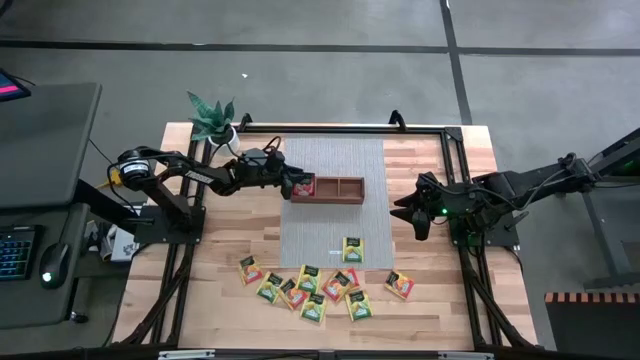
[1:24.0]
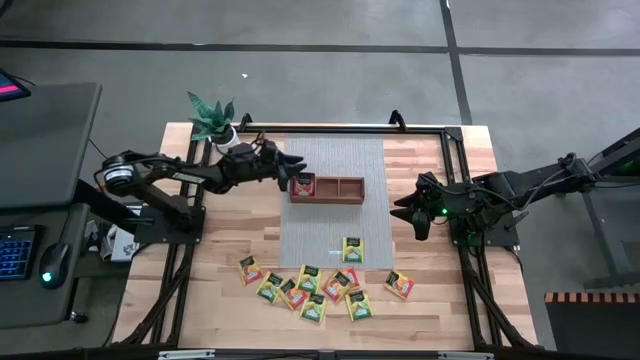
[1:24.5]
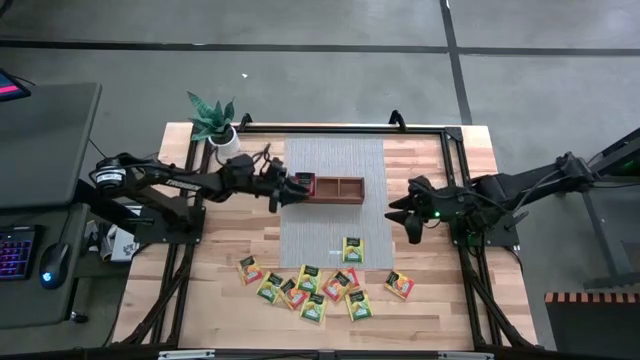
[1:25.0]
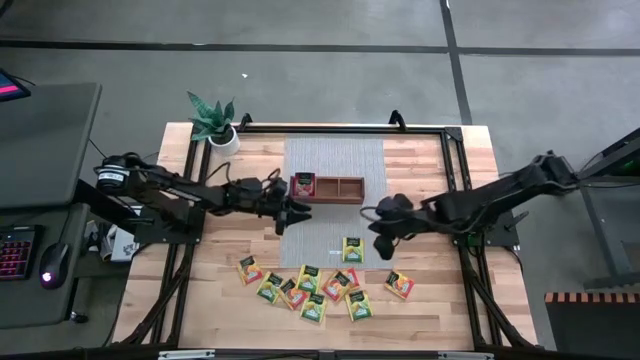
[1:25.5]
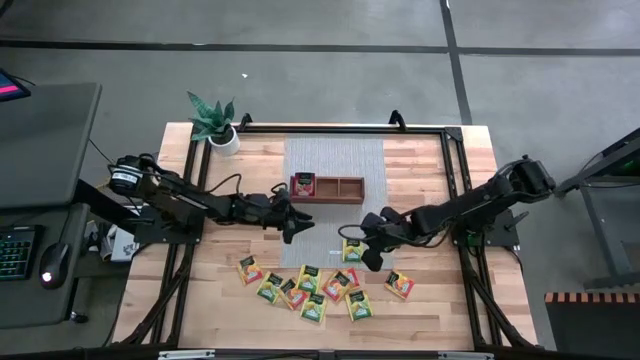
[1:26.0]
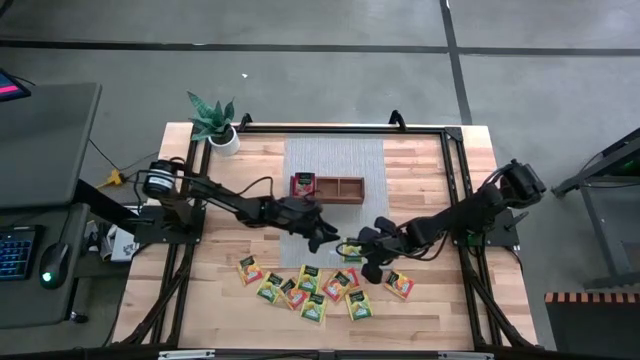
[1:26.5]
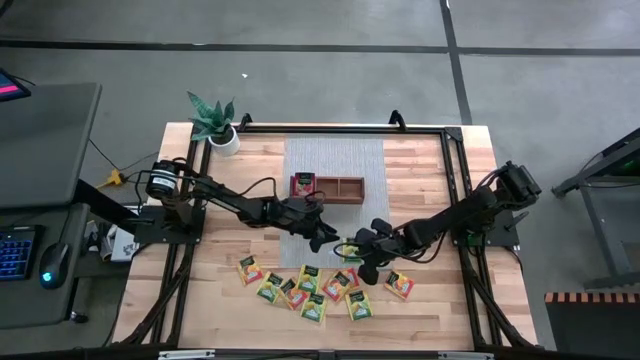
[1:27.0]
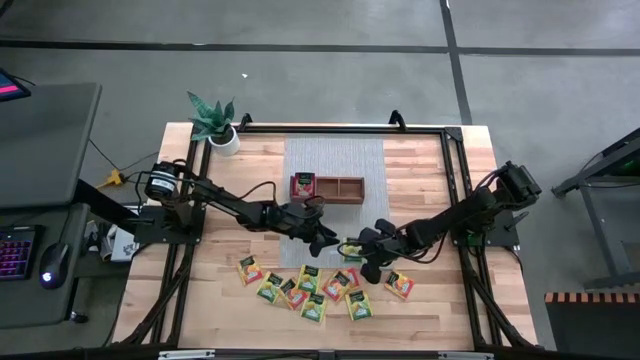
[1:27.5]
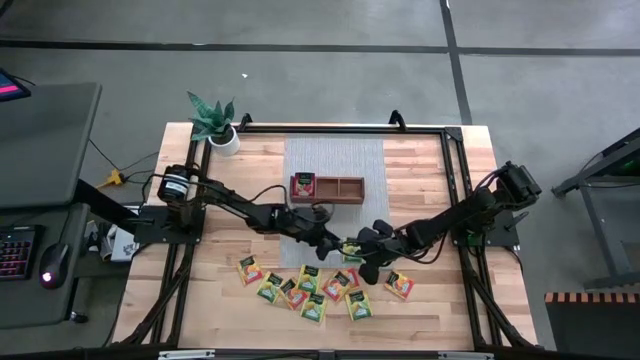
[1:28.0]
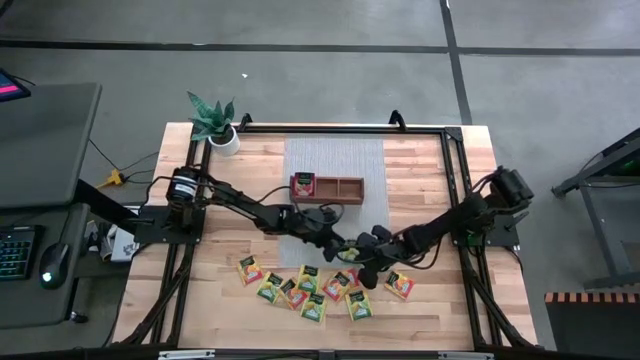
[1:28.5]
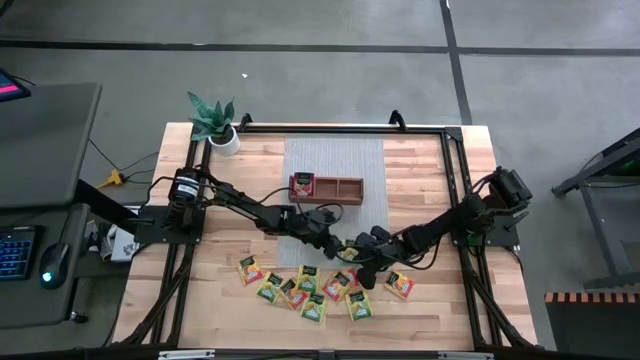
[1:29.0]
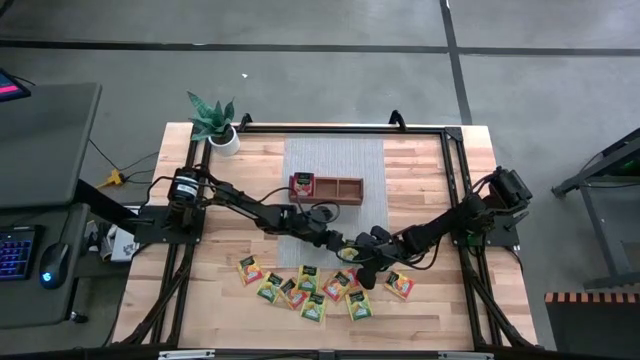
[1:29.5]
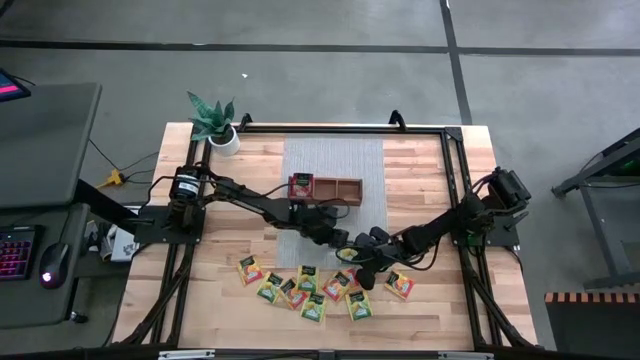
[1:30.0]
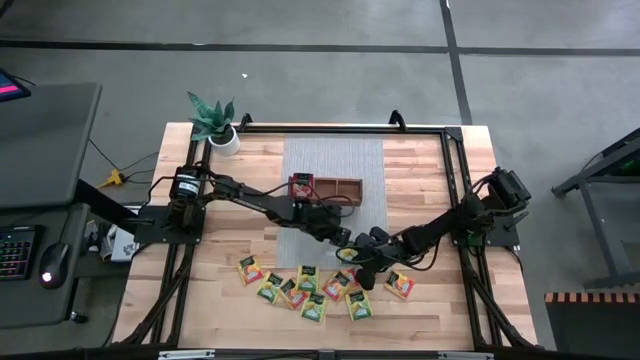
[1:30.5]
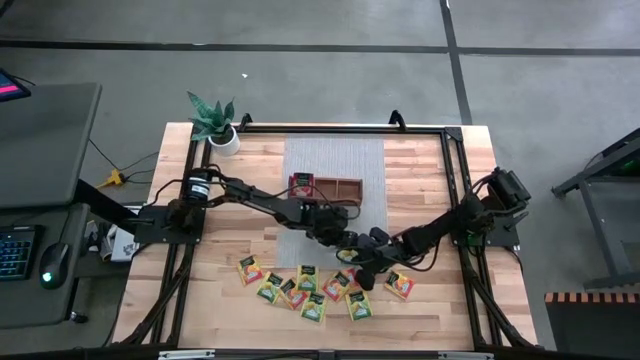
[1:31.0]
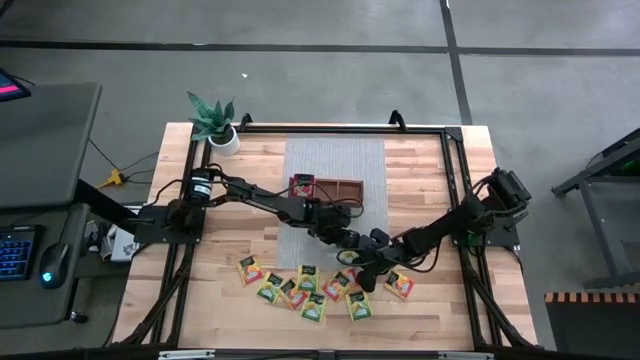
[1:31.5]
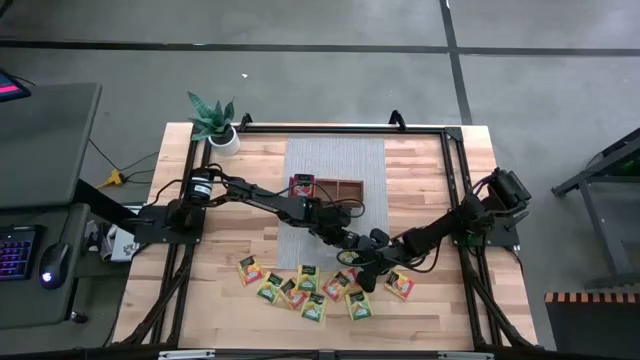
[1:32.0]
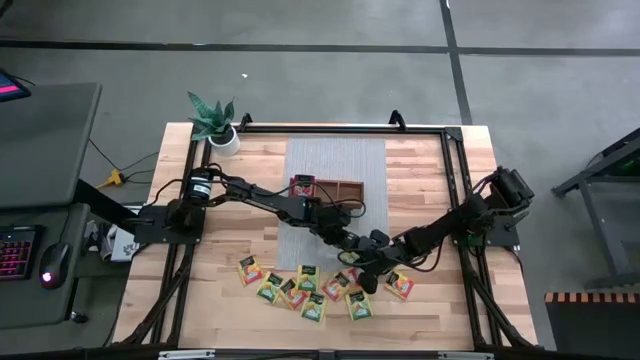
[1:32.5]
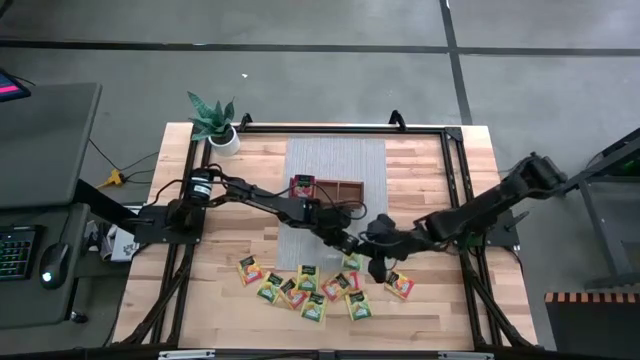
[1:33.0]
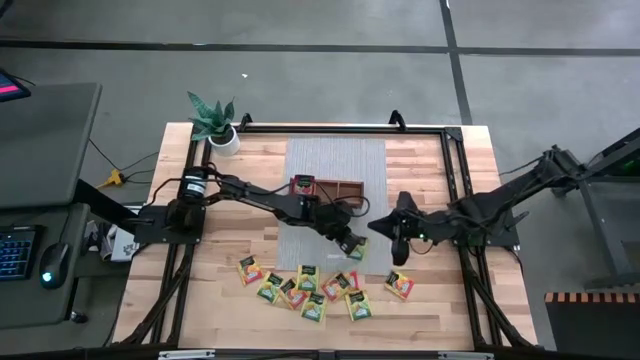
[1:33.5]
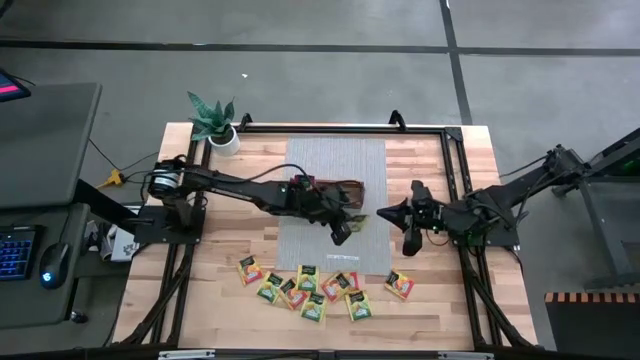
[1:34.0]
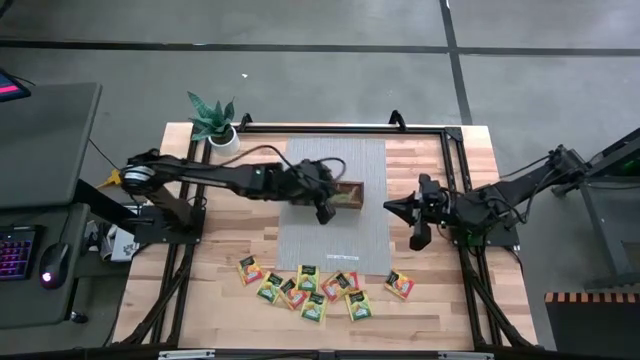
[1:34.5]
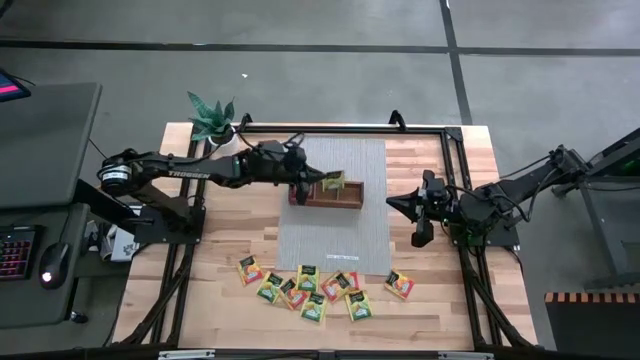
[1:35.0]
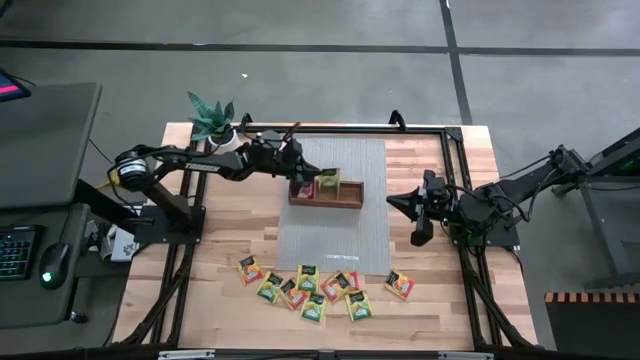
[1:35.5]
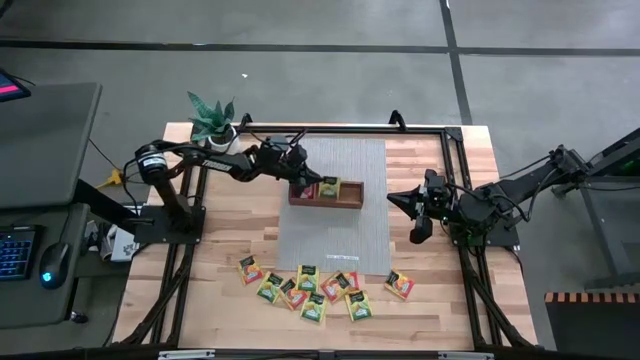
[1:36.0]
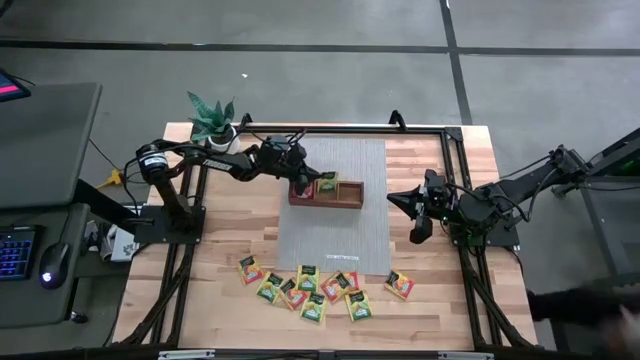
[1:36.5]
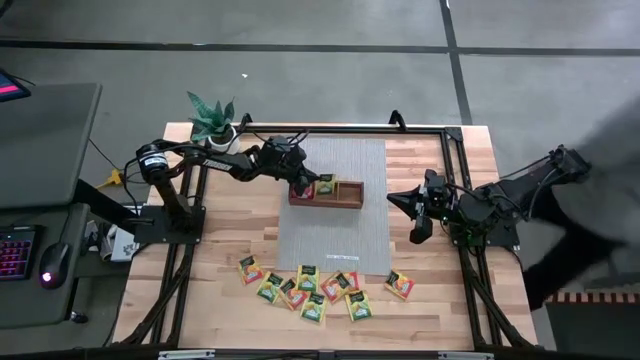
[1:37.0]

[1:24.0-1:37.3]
Task: Pick & Place Tea
Put the yellow tea bag into the middle section of the wooden organizer

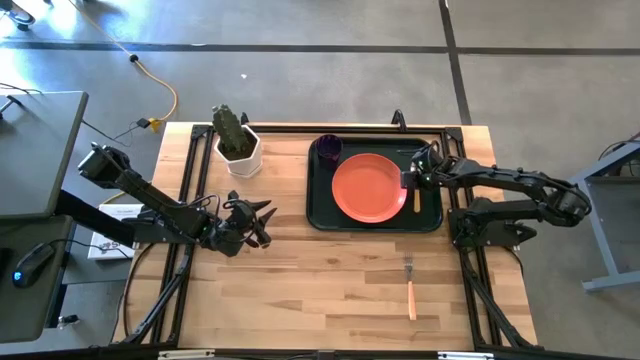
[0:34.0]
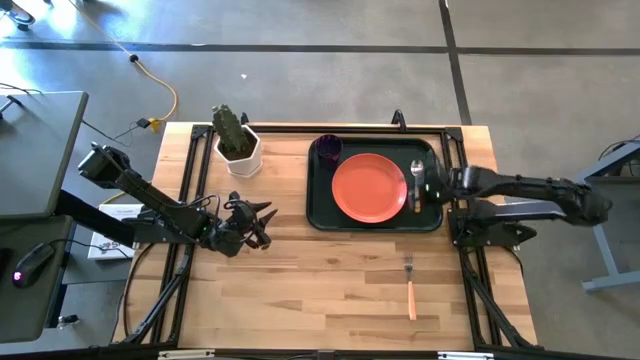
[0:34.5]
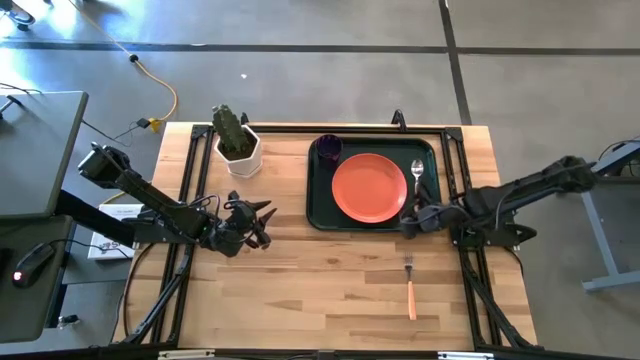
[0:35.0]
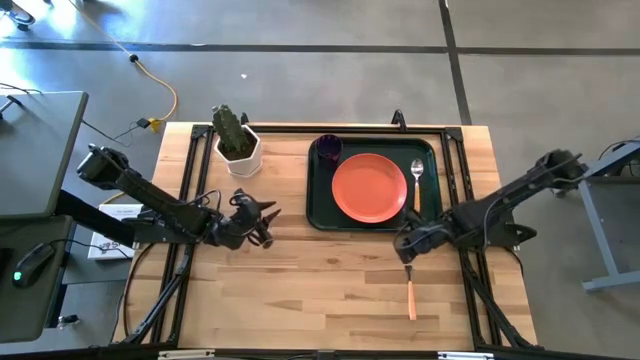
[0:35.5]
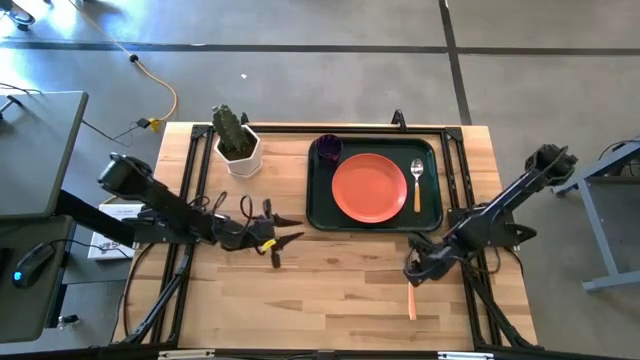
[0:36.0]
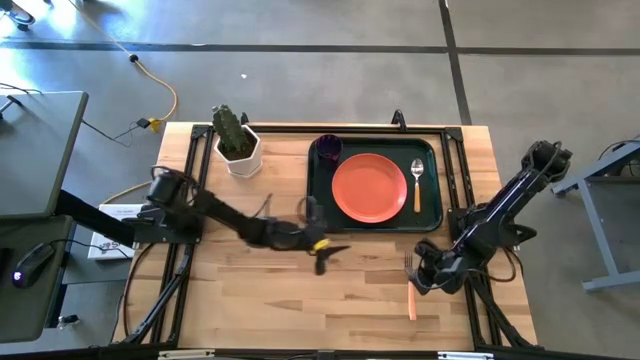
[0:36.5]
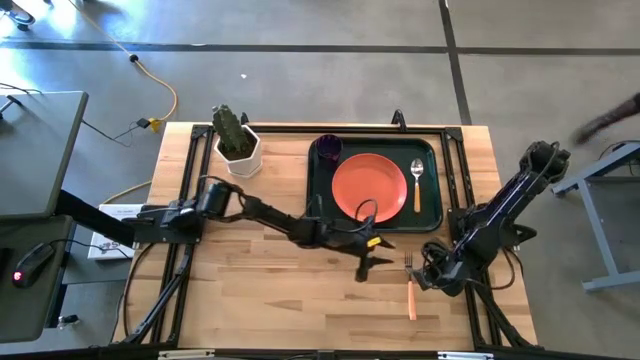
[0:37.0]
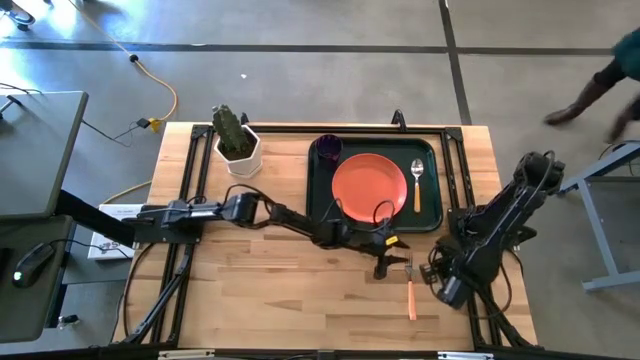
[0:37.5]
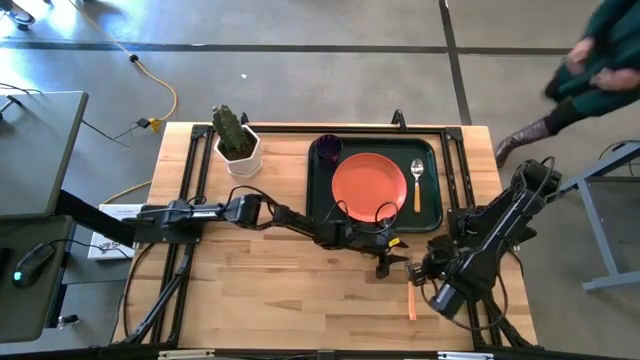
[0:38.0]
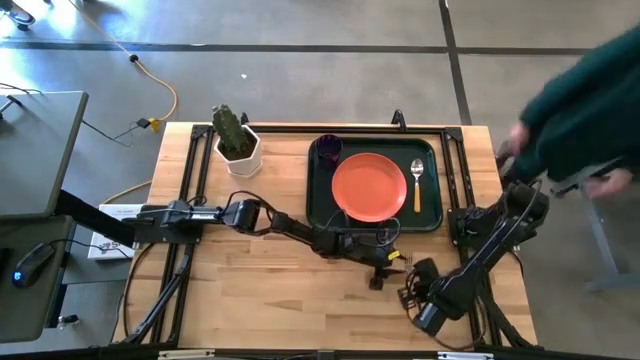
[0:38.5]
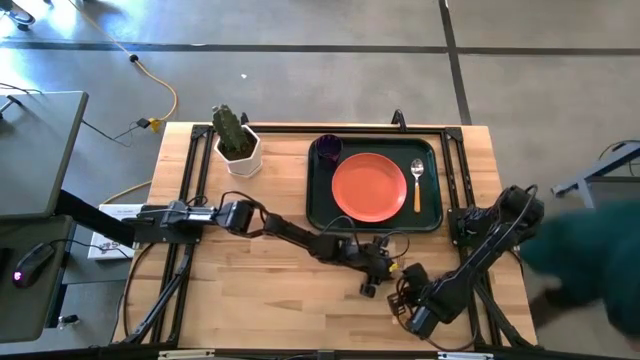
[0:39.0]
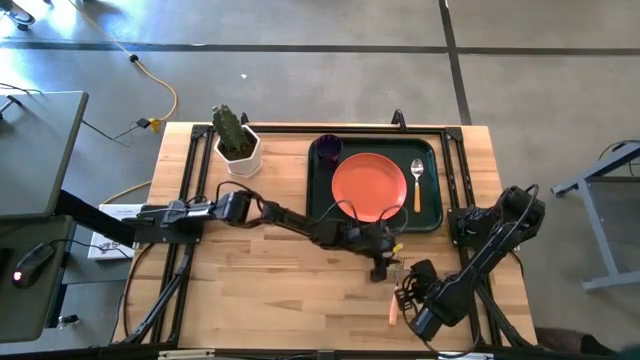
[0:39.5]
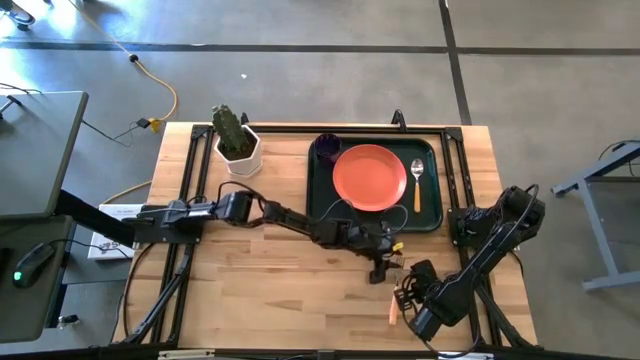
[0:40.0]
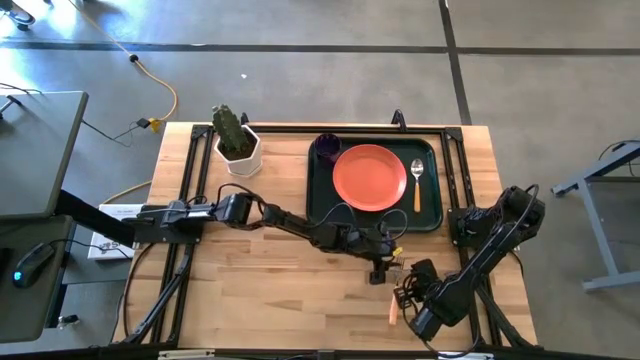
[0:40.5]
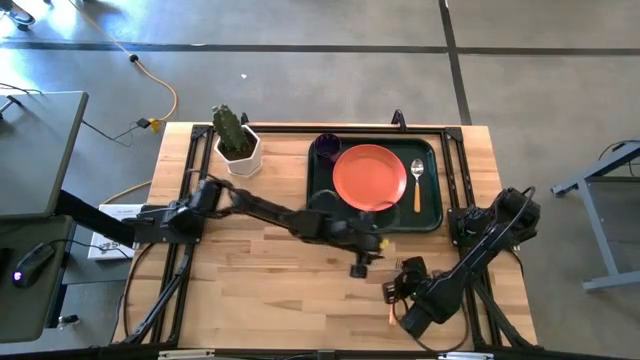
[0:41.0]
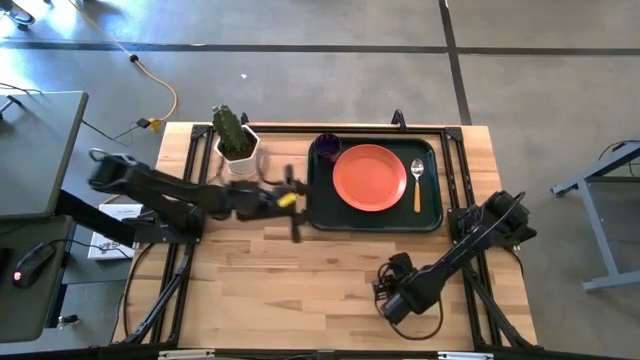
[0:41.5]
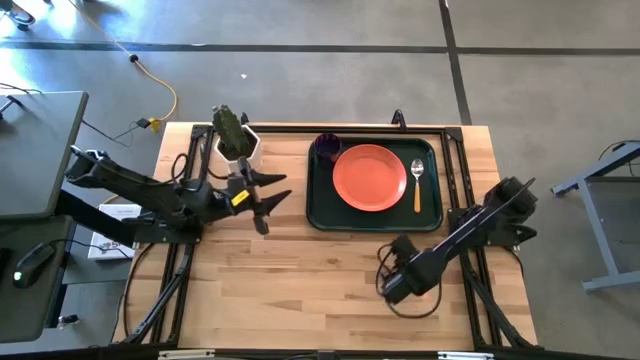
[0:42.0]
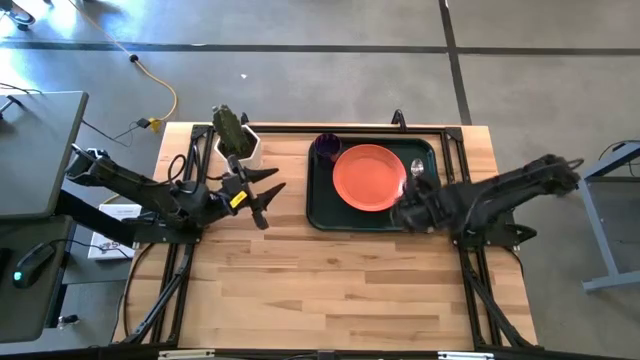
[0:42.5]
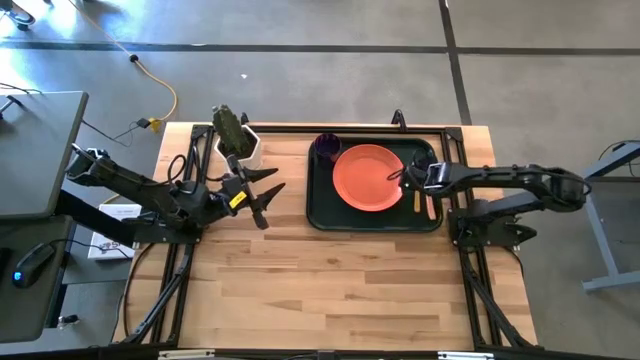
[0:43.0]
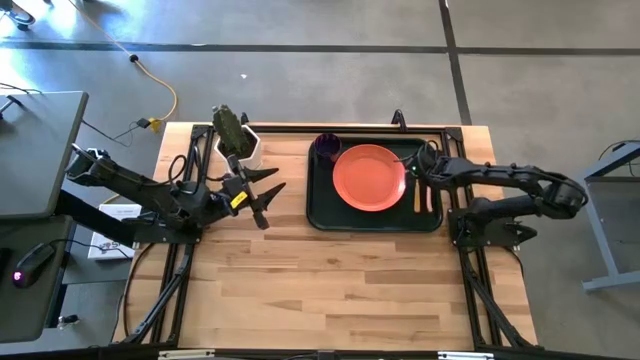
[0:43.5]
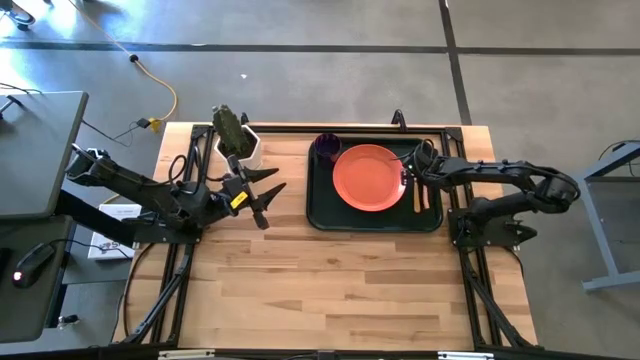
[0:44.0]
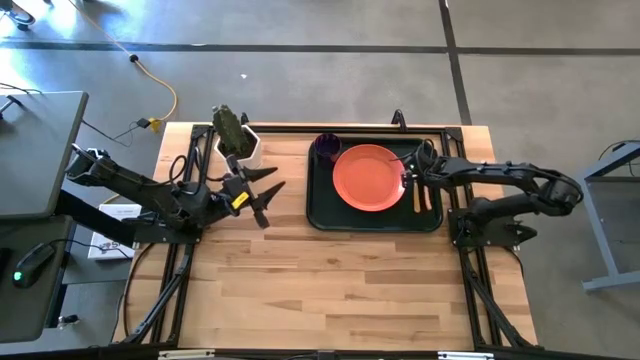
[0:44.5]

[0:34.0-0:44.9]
Task: Pick and place plate/cup/fork/spoon on tray
Put the orange fork on the black tray to the right of the yellow spoon
